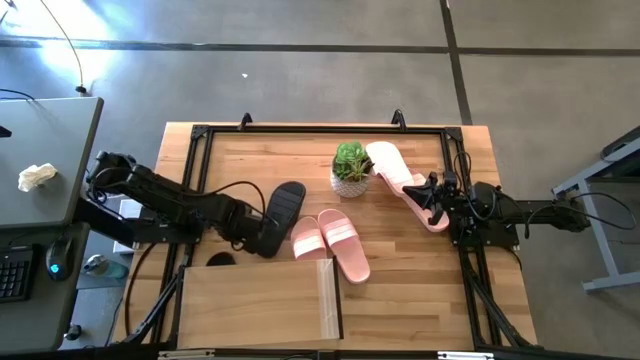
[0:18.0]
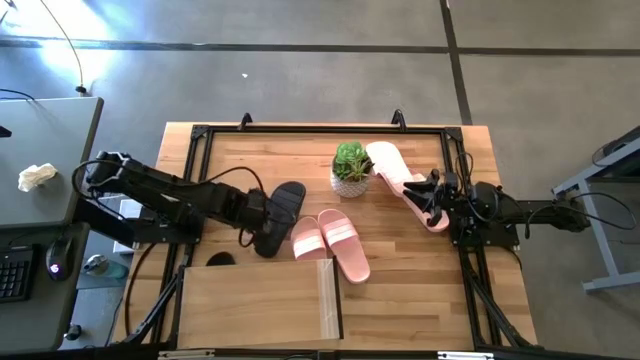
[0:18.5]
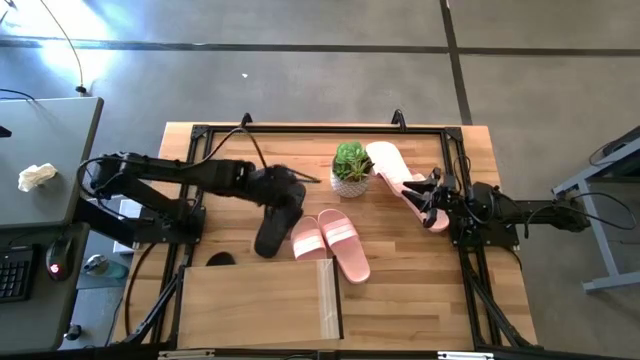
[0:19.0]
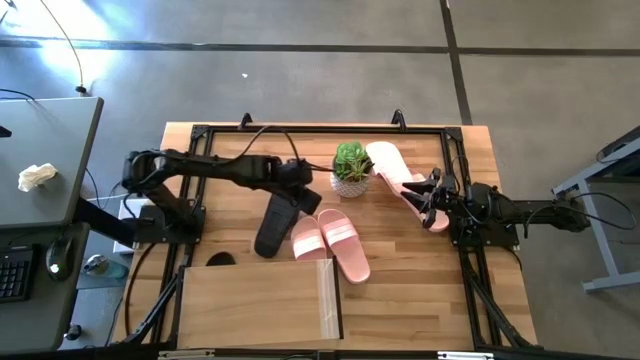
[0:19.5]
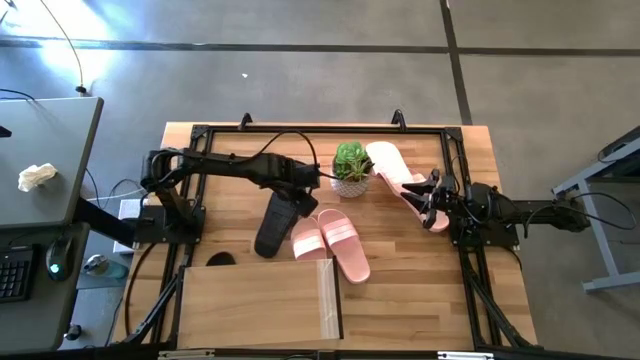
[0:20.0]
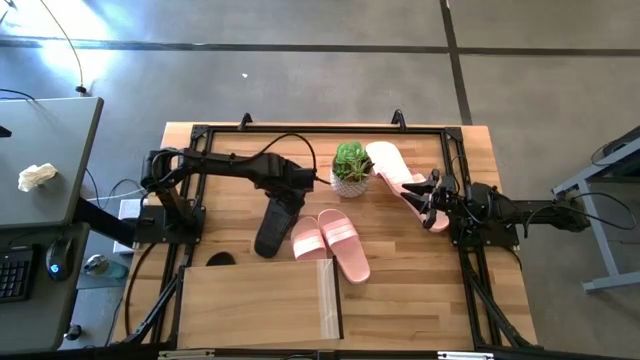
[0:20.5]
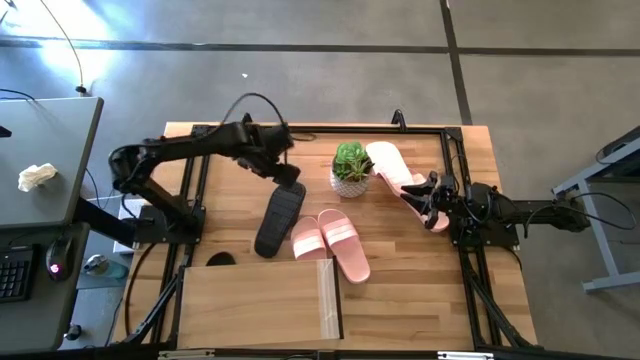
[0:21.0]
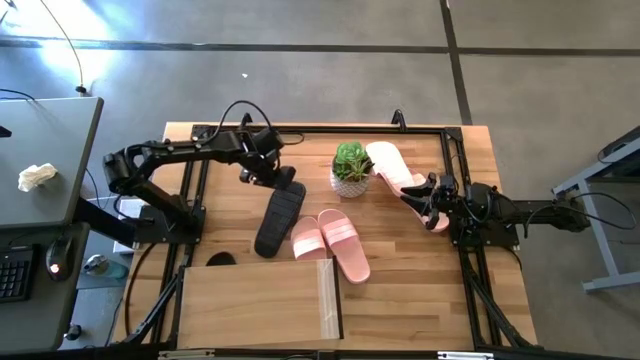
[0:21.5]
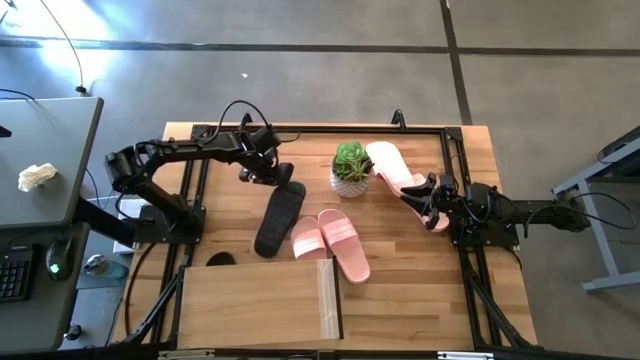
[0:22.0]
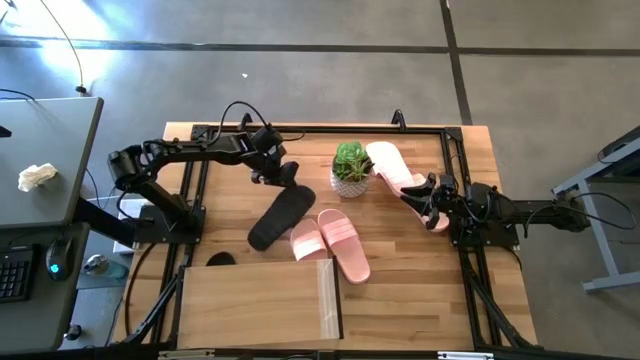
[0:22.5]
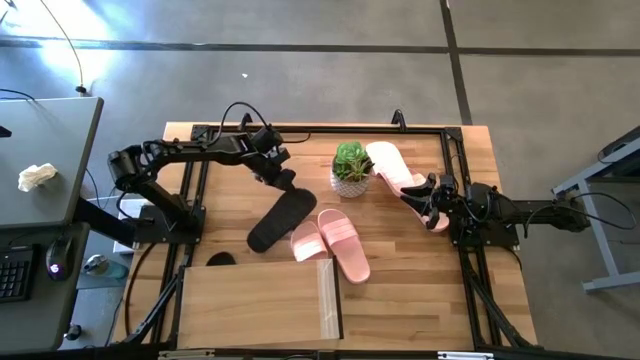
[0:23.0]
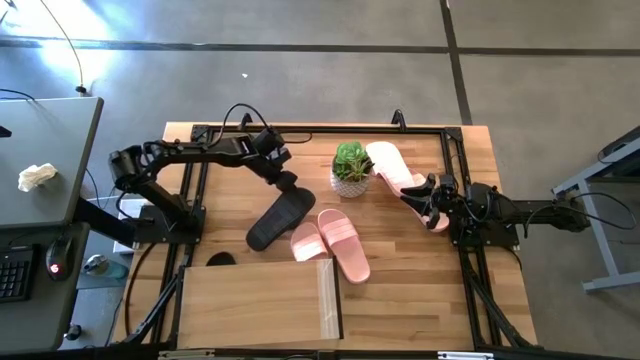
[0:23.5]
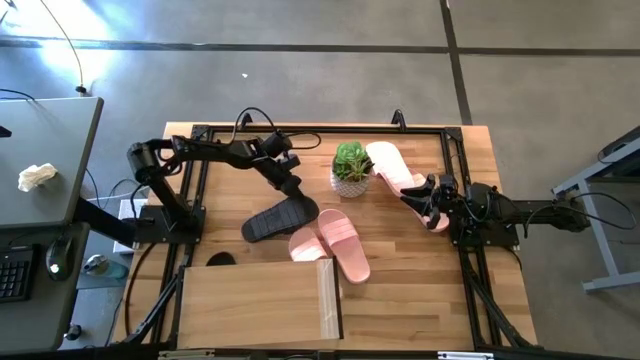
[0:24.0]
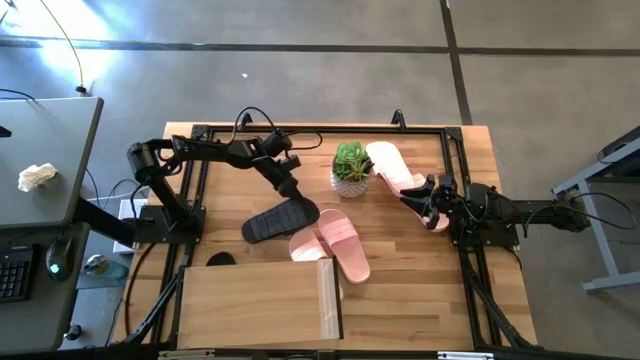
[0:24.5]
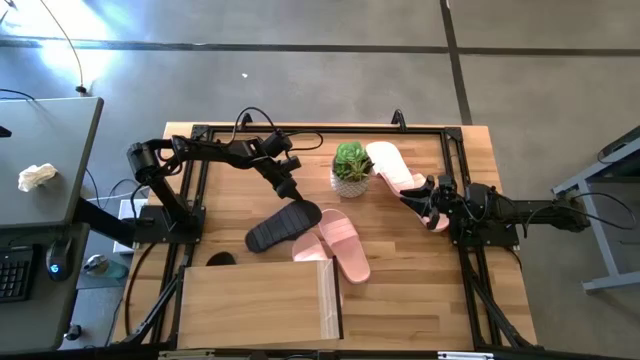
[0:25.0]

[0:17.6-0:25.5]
Task: Pick and place slides into the shelf
Put the black slide under the shelf

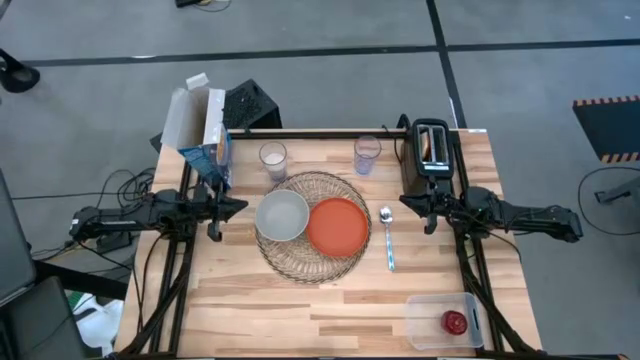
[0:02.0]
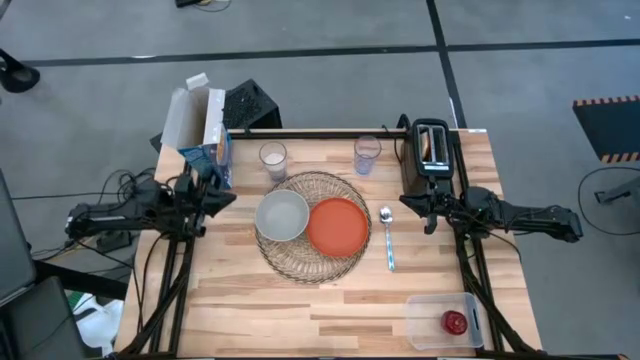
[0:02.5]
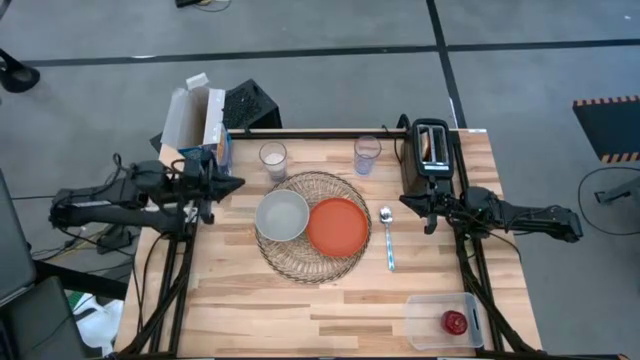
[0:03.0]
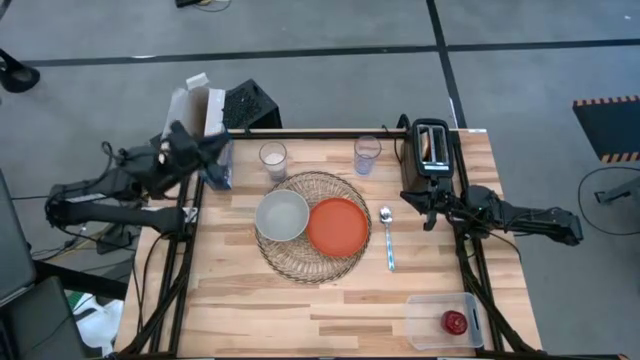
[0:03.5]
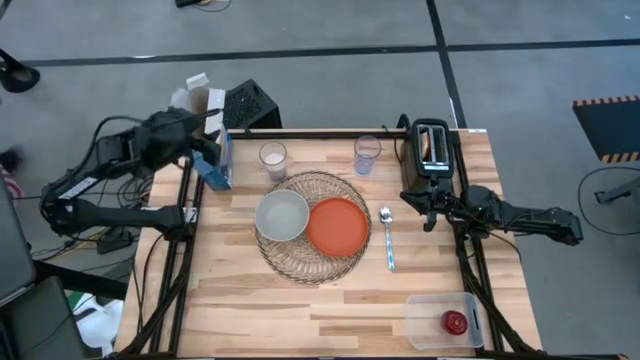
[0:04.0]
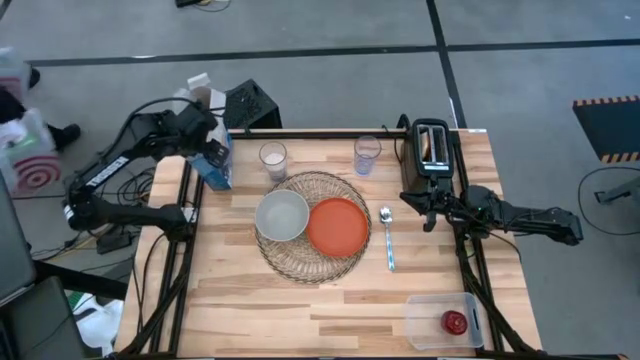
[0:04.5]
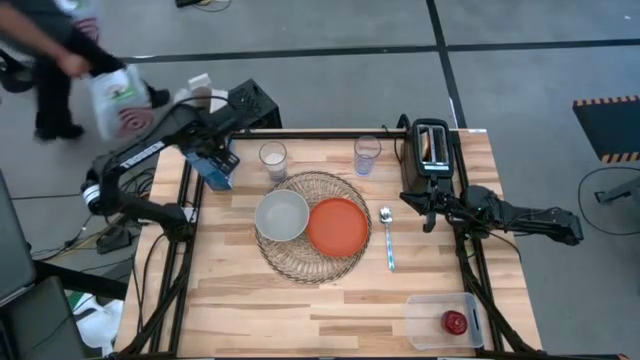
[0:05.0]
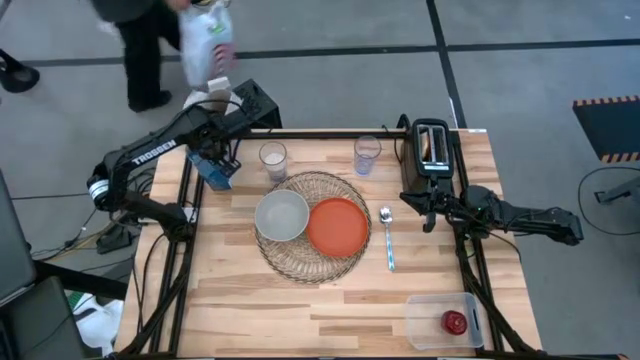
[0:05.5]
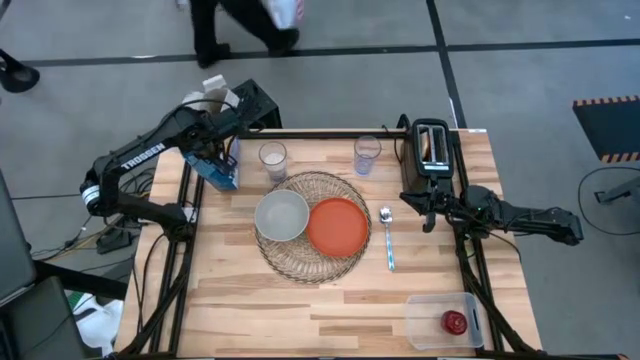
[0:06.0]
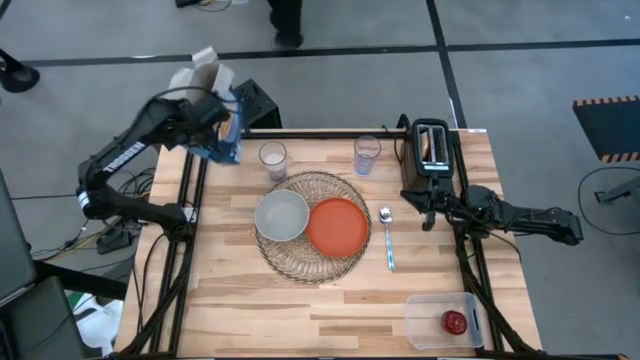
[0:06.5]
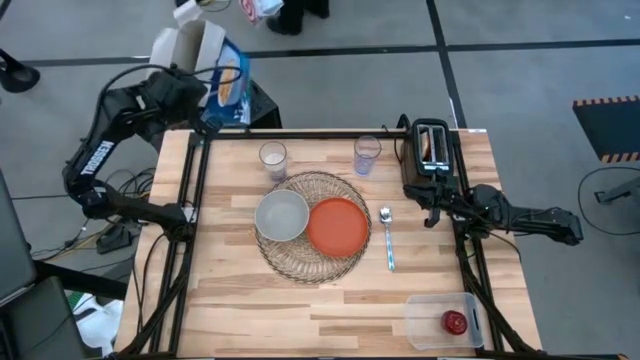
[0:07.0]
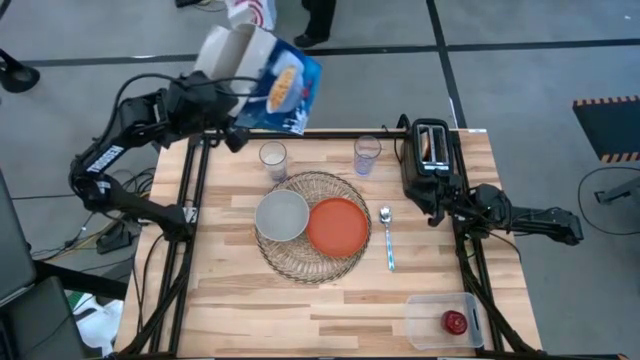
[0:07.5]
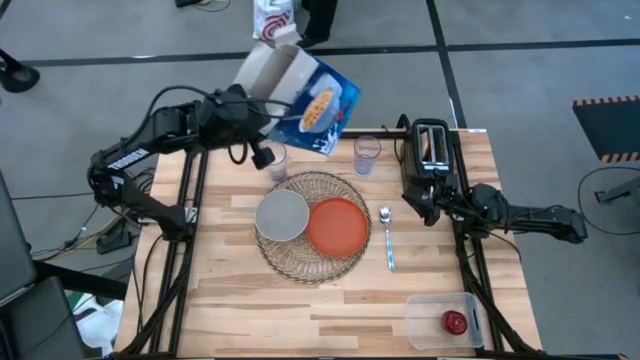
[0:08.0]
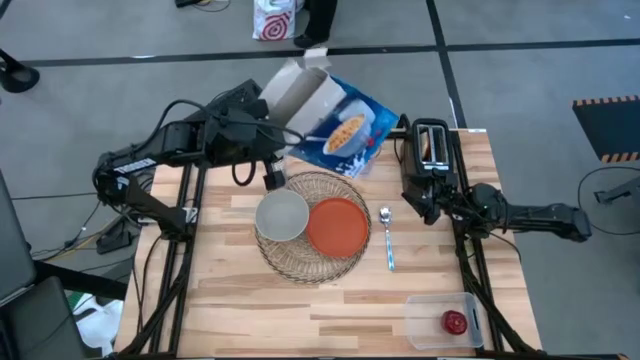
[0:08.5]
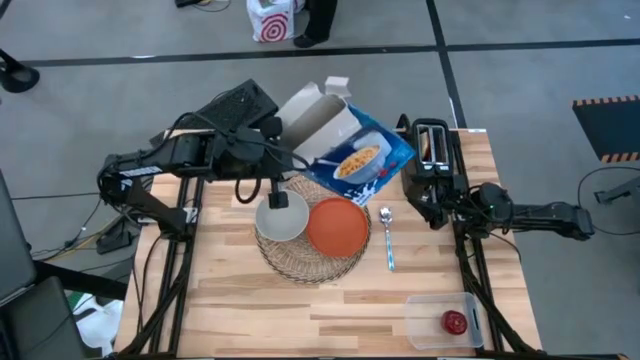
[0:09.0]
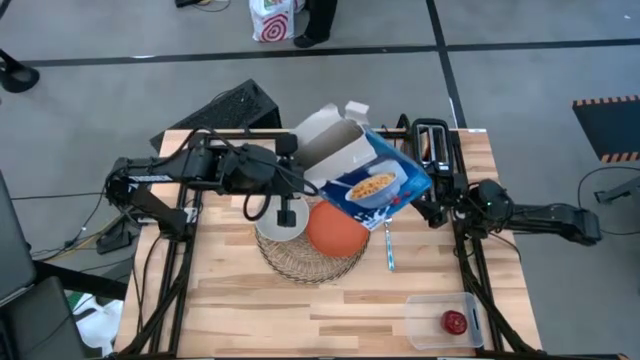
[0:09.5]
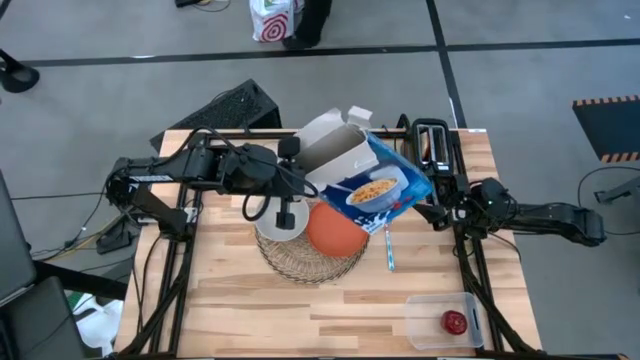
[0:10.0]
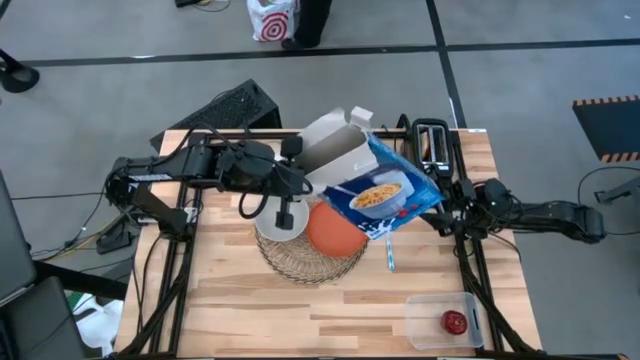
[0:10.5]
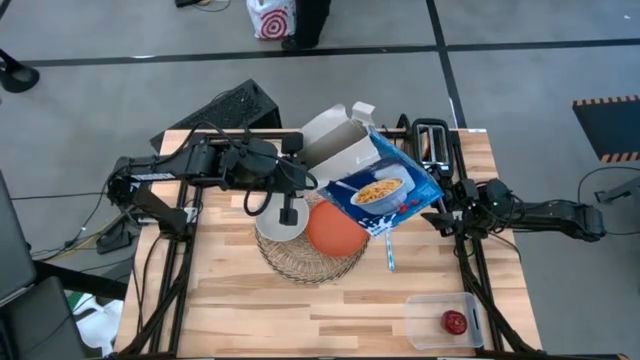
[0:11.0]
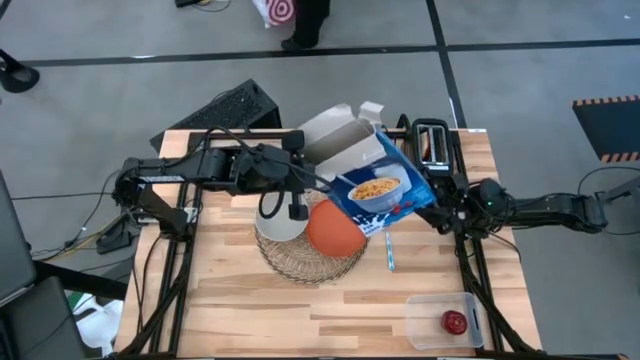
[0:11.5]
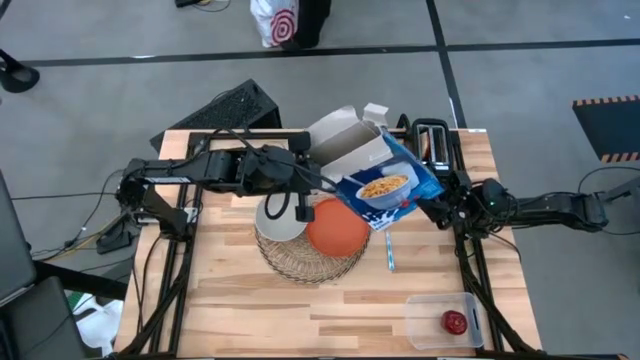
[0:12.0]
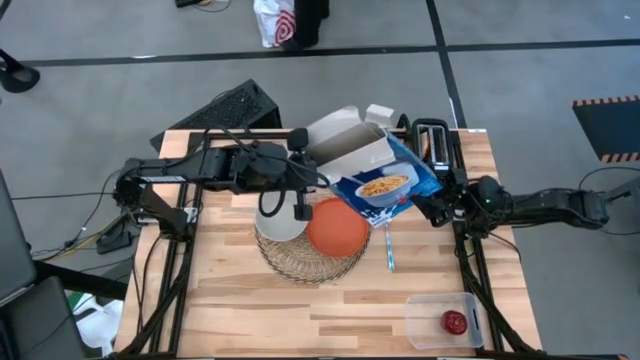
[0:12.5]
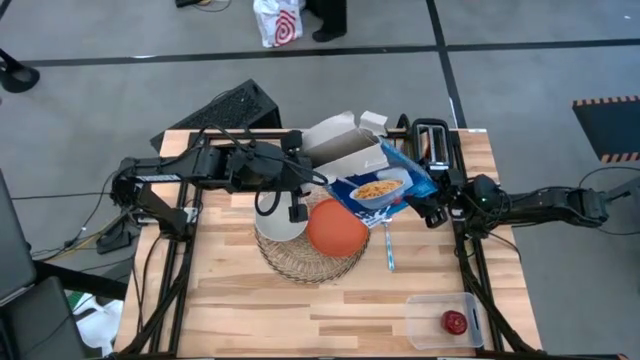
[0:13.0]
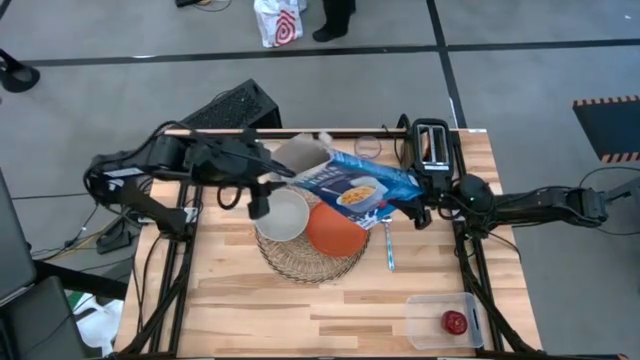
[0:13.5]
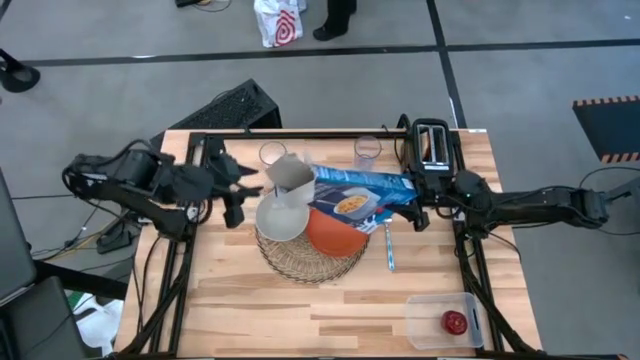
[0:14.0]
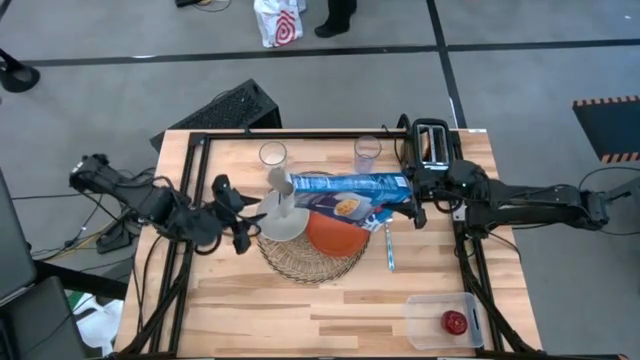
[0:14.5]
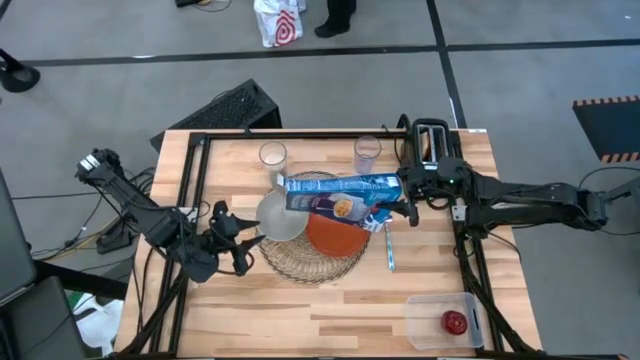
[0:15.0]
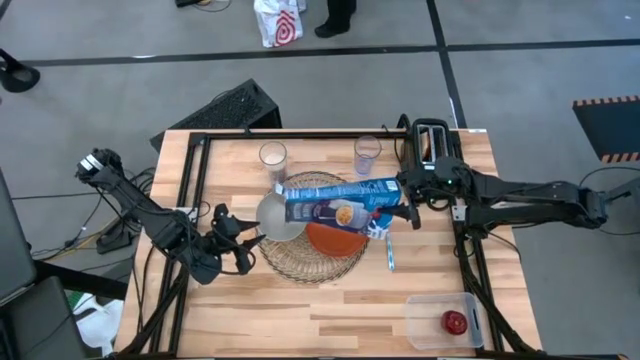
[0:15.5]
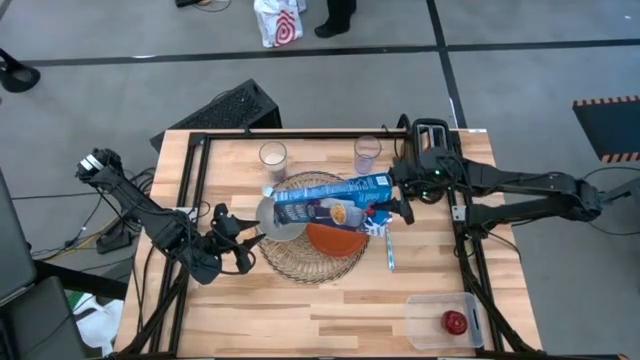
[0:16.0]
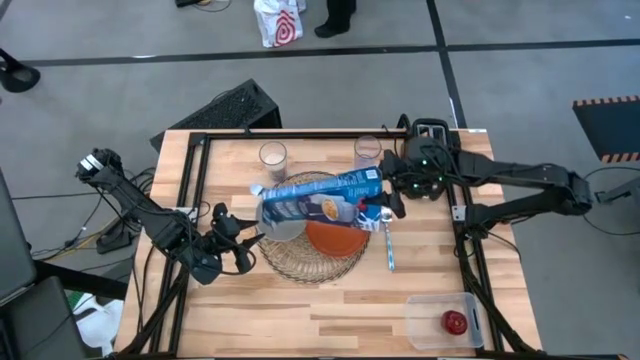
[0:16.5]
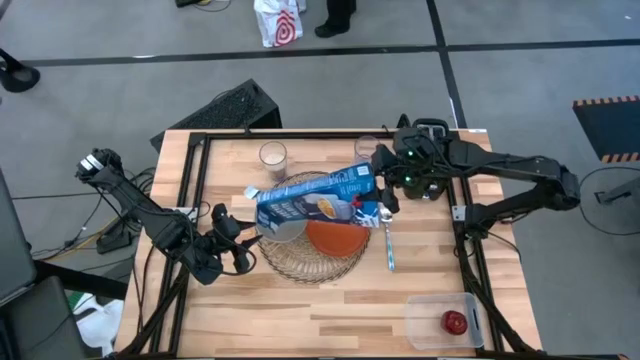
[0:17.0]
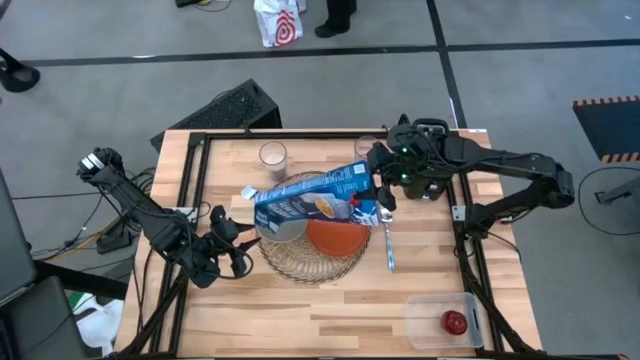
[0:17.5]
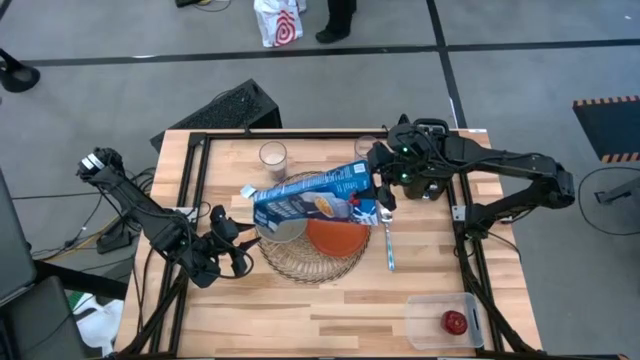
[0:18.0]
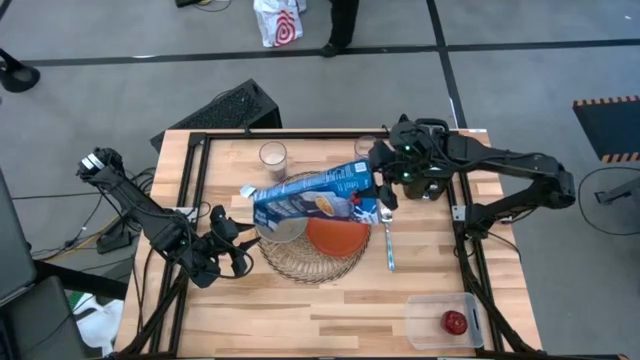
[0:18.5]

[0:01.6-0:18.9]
Task: Arrange a breakfast setting
Pour the cereal into the gray bowl
